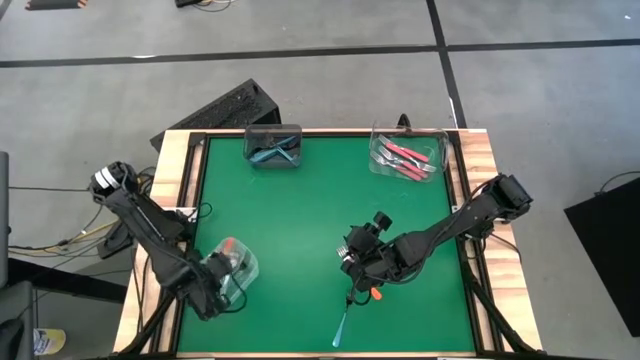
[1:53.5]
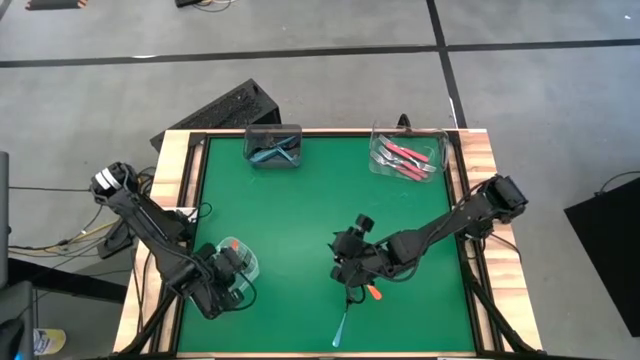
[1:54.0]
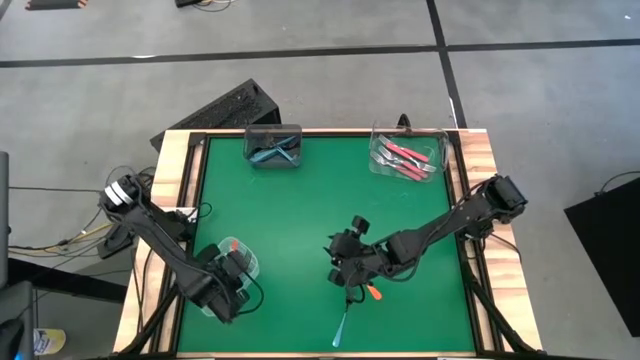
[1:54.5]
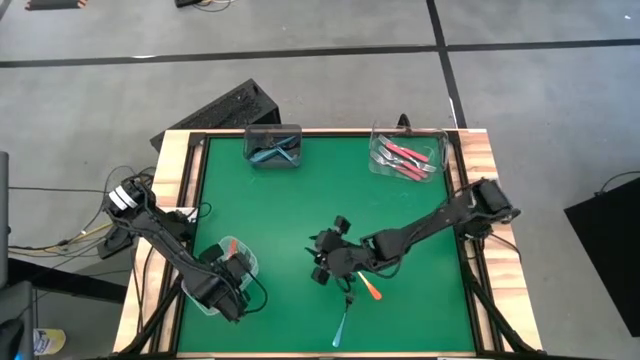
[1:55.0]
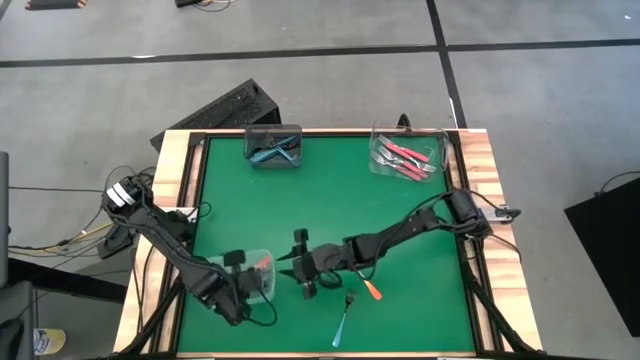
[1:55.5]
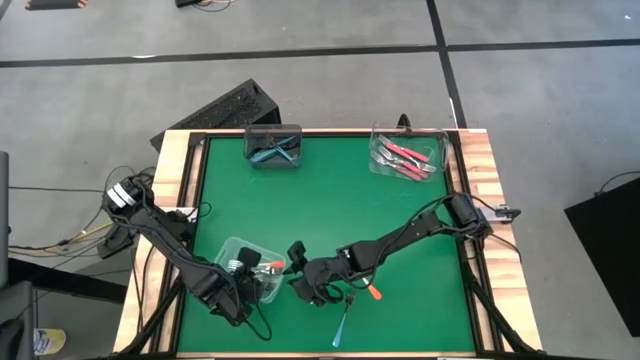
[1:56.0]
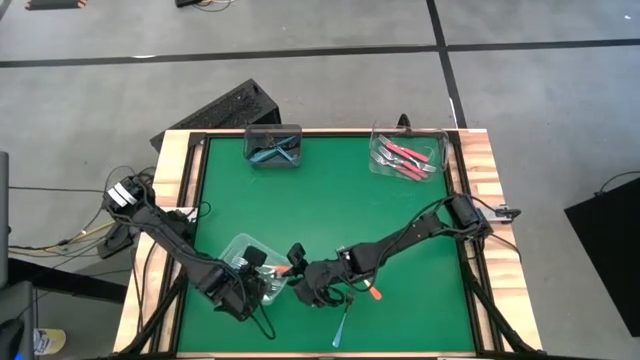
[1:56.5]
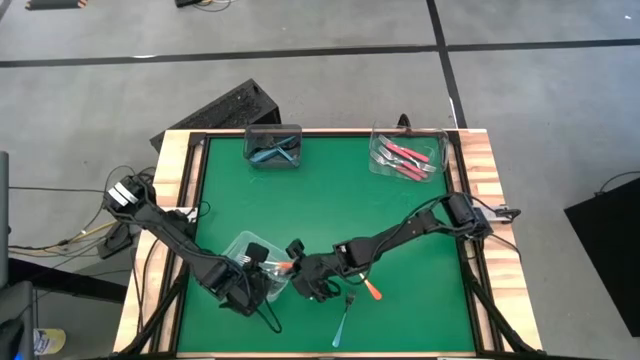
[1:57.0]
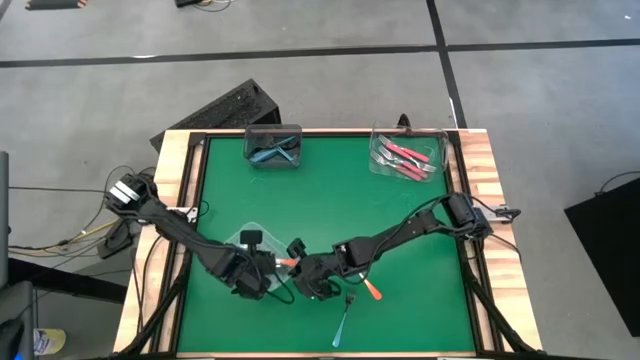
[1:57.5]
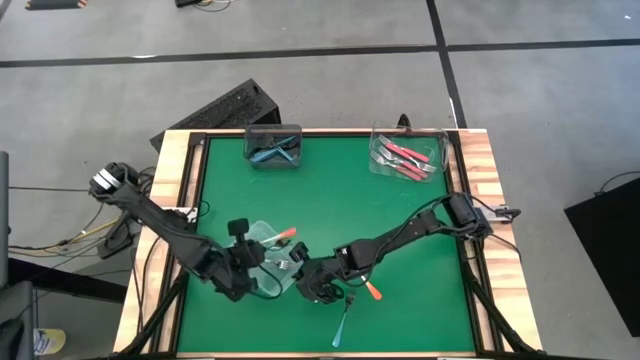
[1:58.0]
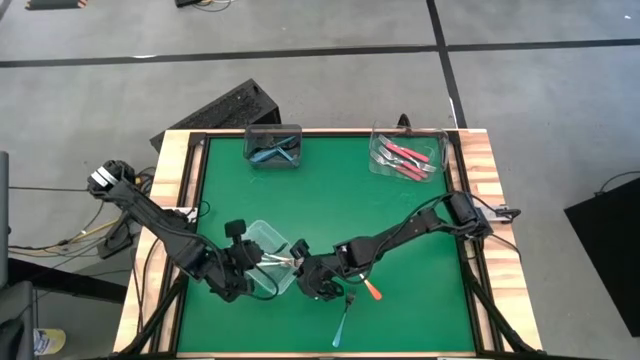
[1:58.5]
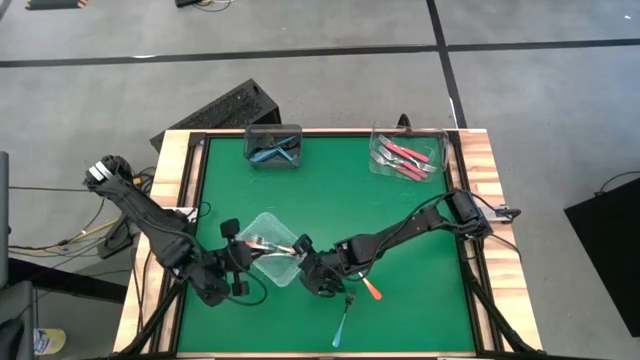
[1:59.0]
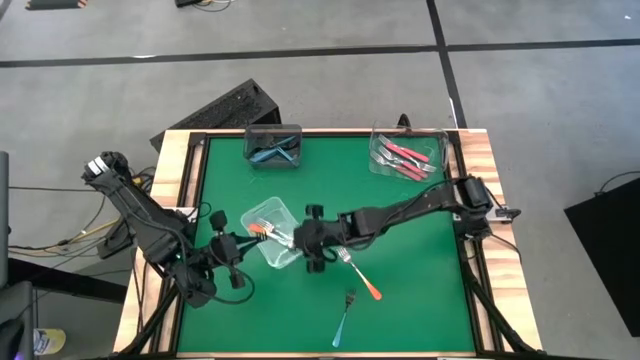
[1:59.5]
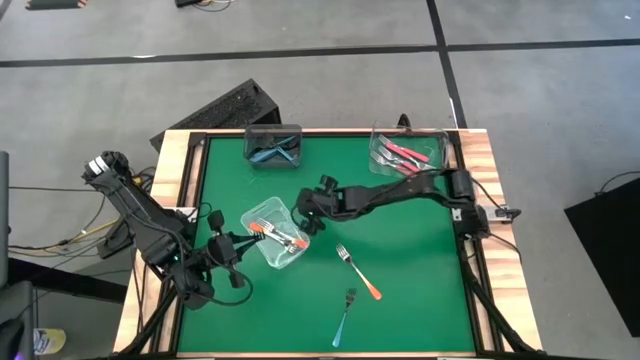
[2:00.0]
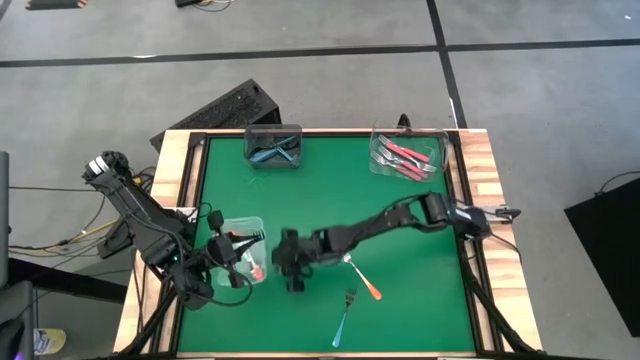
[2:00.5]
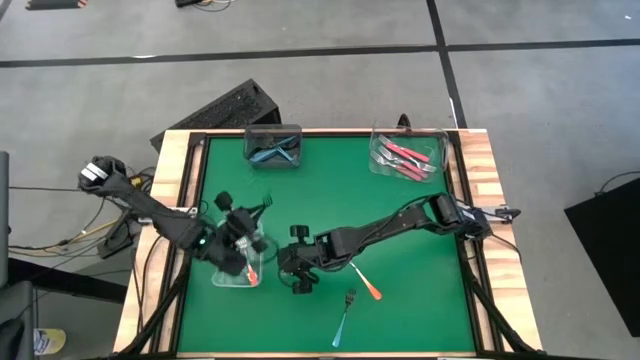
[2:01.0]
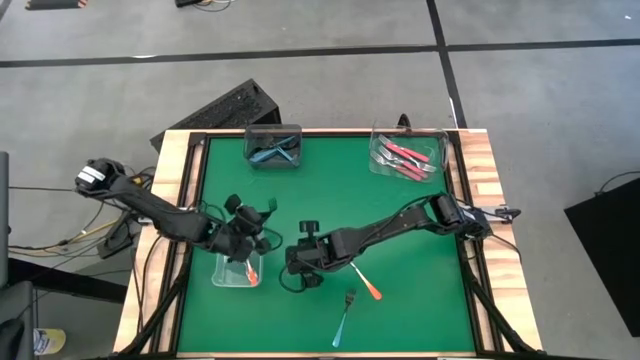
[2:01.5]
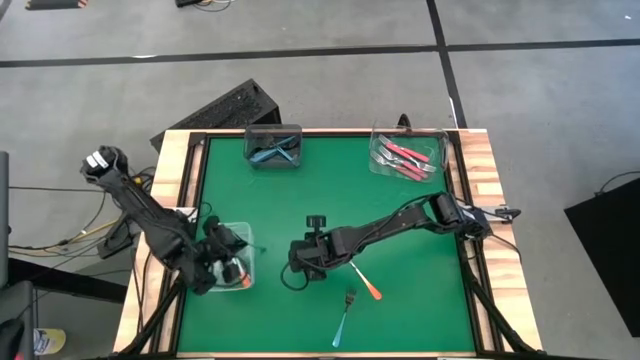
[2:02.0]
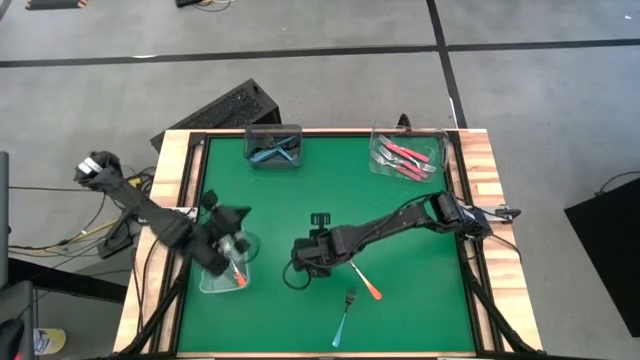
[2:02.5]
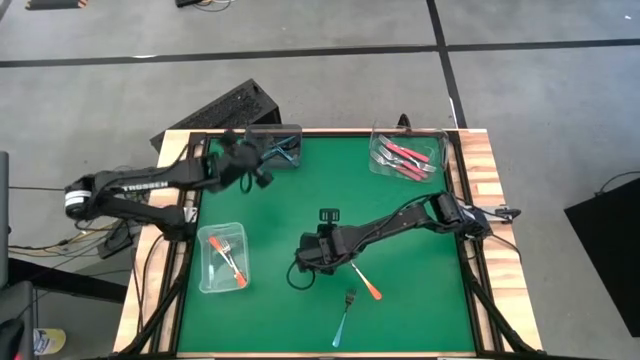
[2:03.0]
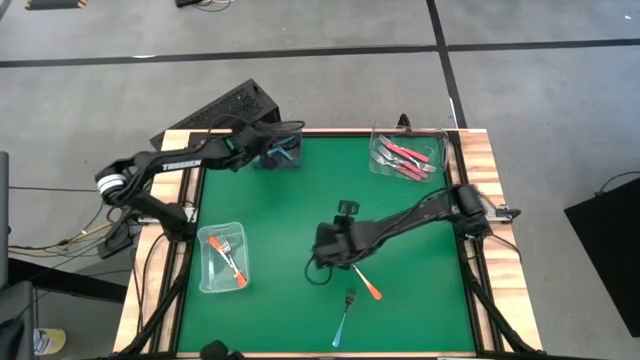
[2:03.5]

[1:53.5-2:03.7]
Task: Sort silverware by color (type)
Put the blue fork into the black bin

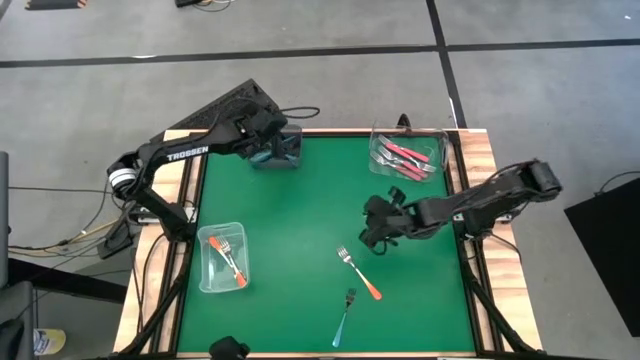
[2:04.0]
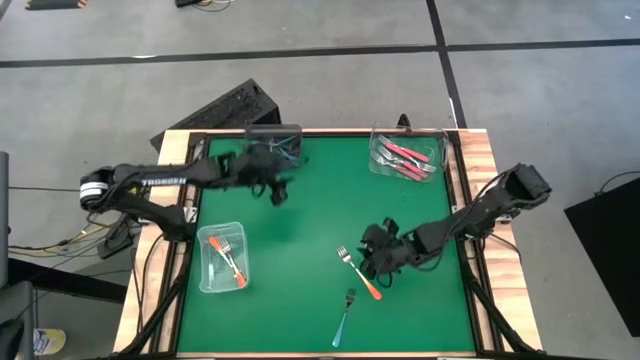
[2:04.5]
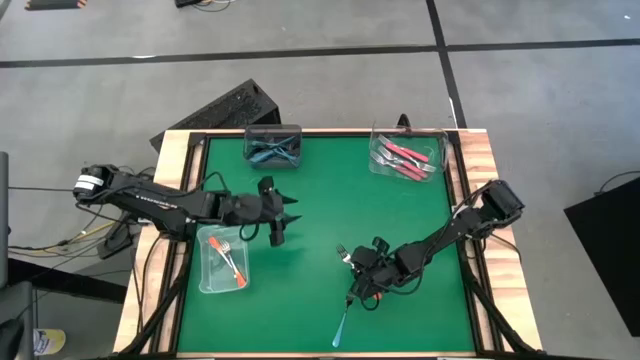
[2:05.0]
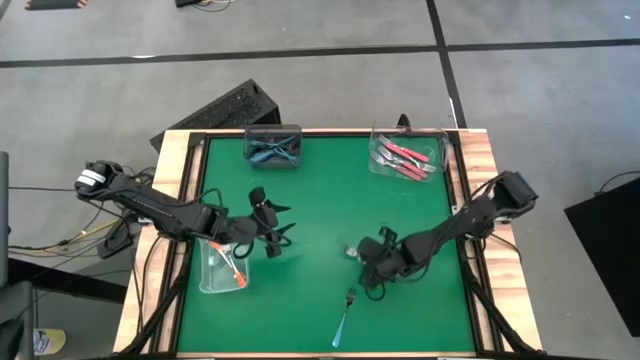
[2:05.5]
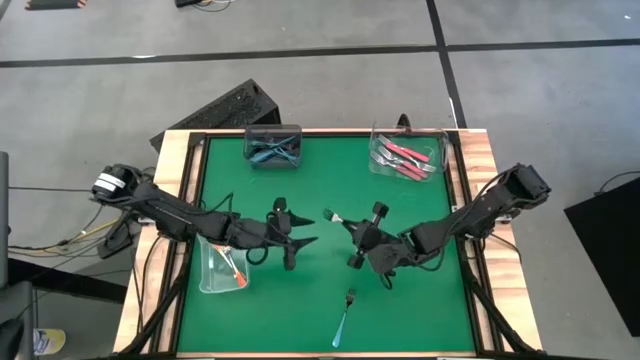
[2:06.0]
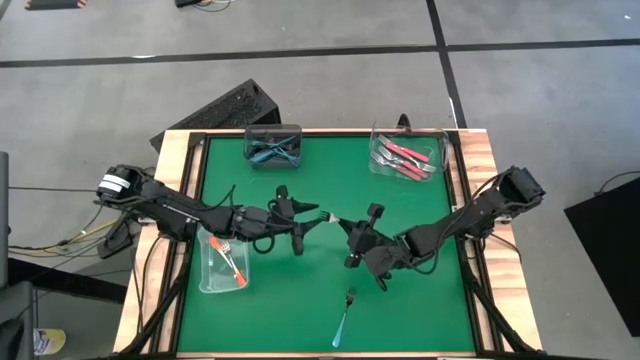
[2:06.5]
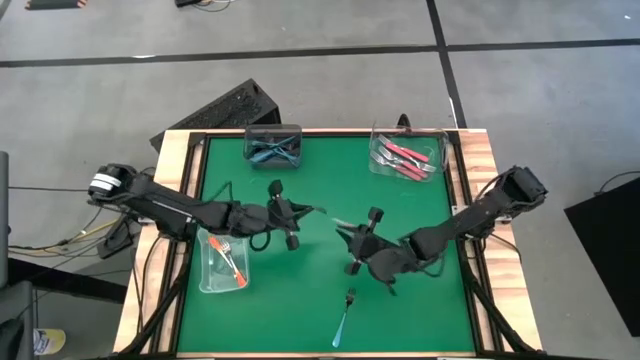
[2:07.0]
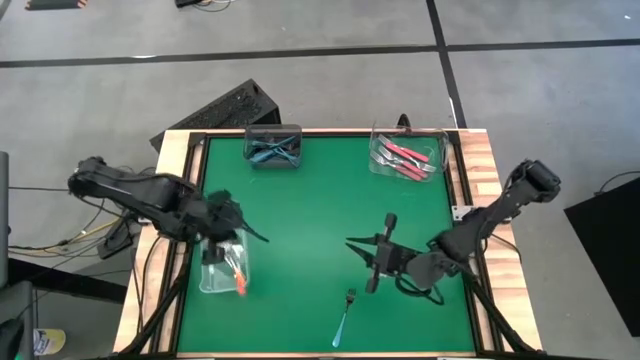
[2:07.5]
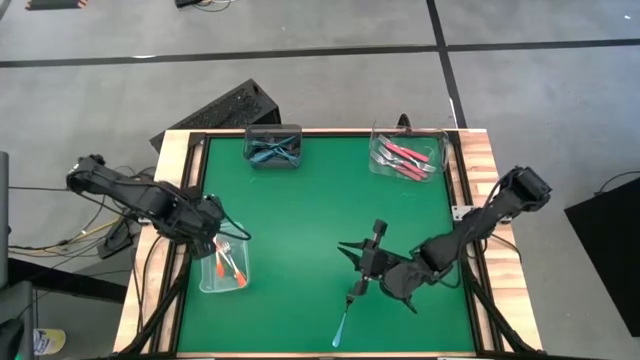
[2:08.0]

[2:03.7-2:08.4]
Put the orange fork into the white bin

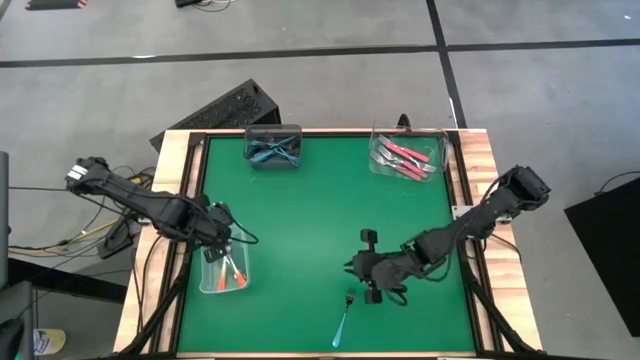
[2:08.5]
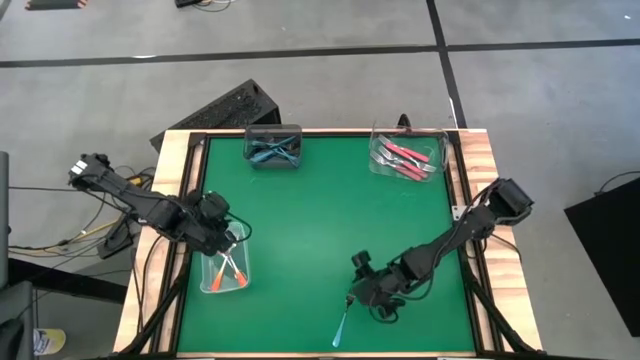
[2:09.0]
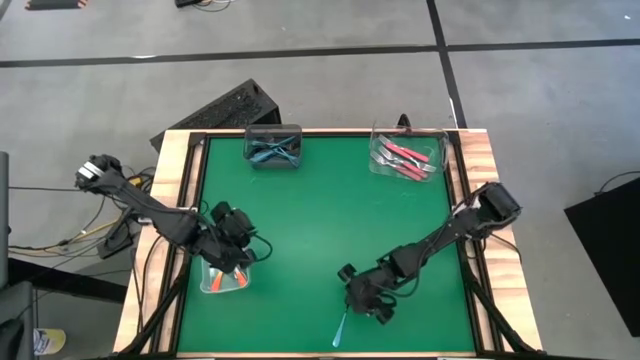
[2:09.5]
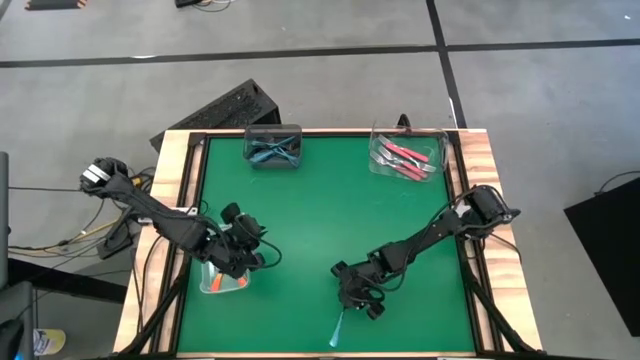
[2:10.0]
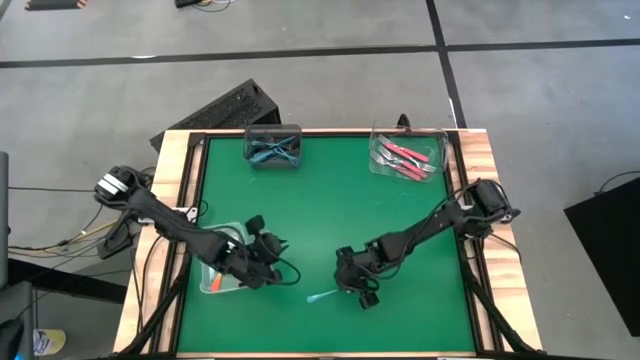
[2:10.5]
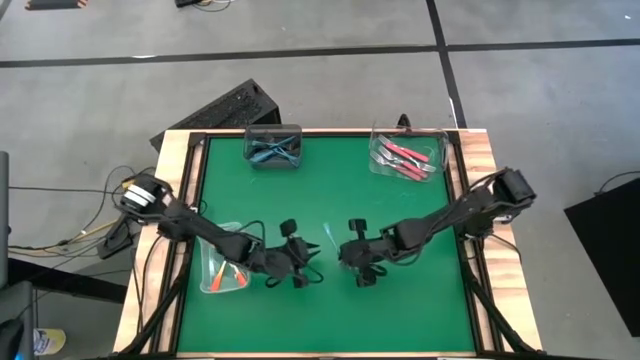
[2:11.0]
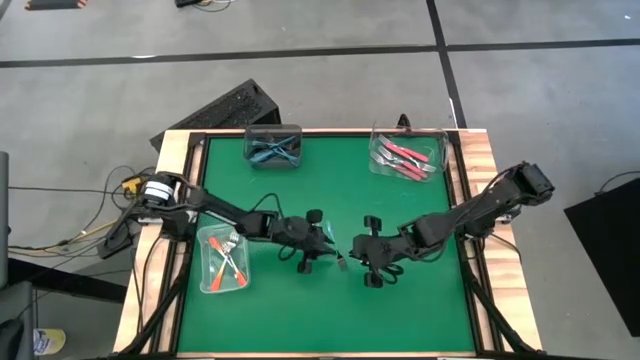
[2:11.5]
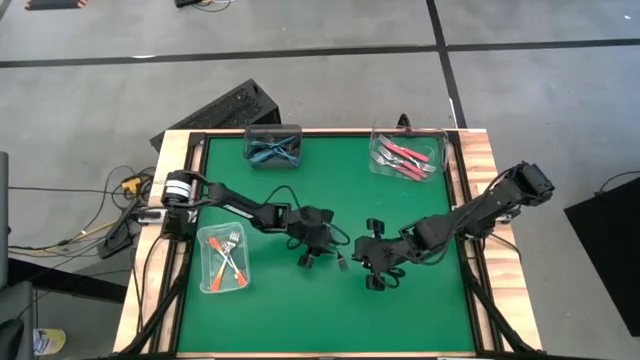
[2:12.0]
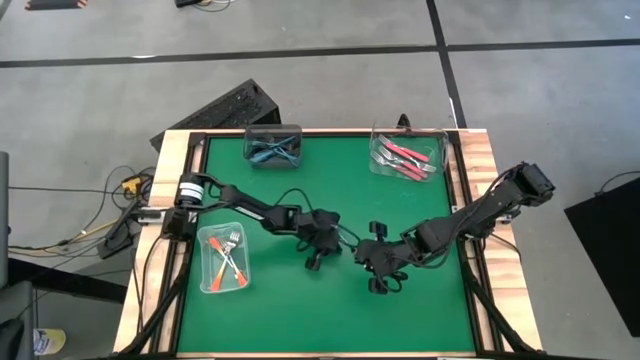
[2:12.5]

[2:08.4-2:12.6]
Put the blue fork into the black bin

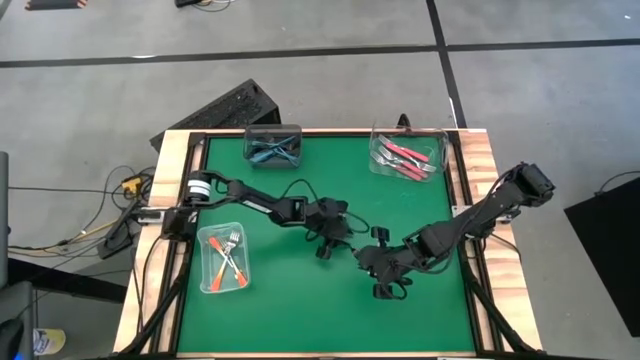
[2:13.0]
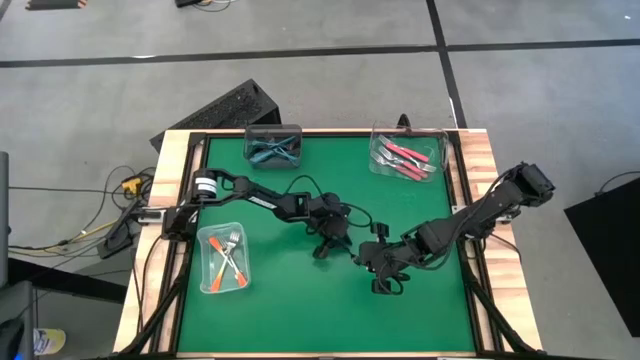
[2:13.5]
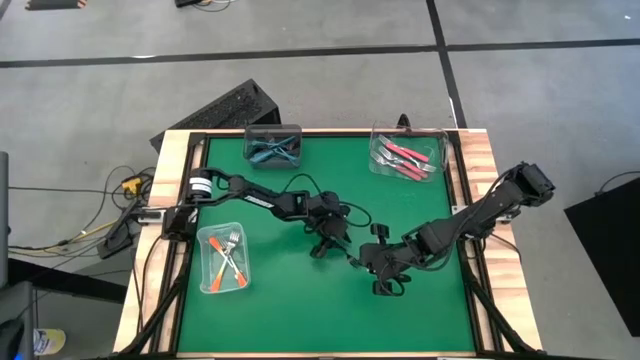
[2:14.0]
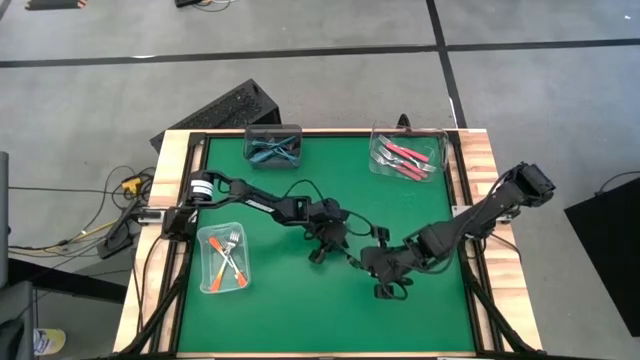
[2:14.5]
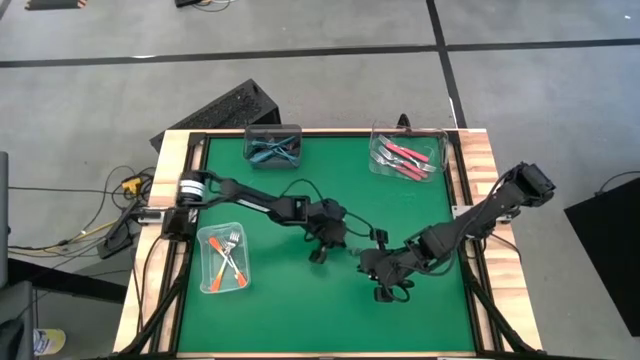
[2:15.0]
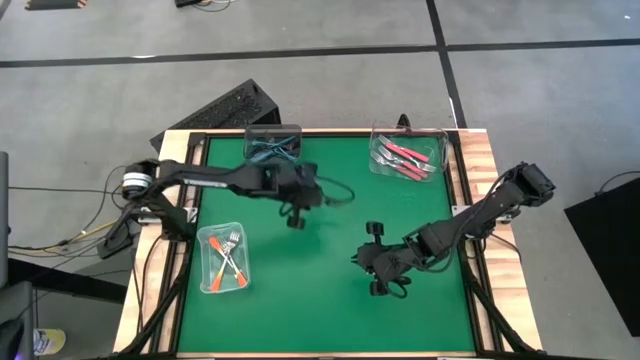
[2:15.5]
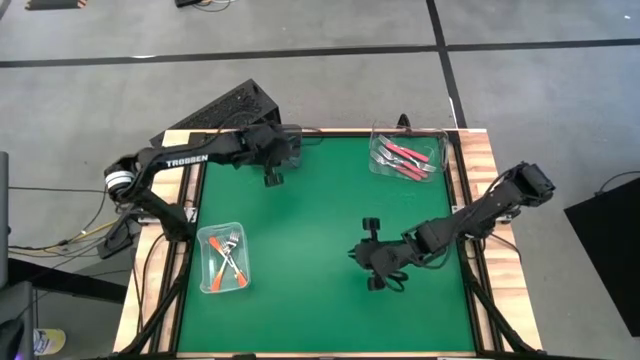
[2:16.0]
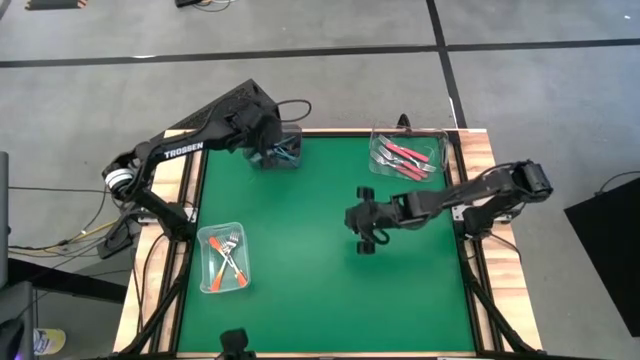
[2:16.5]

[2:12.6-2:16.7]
Put the blue fork into the black bin
